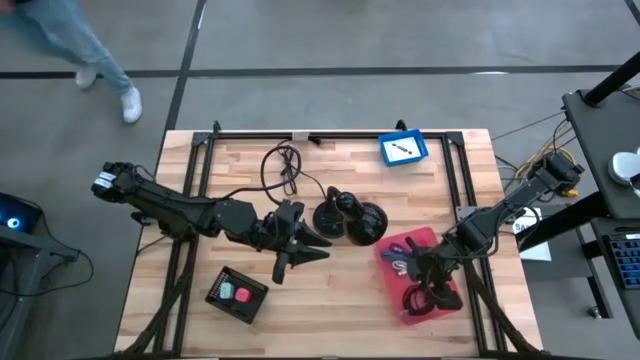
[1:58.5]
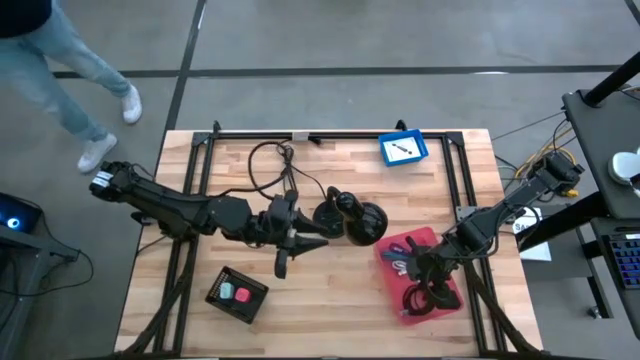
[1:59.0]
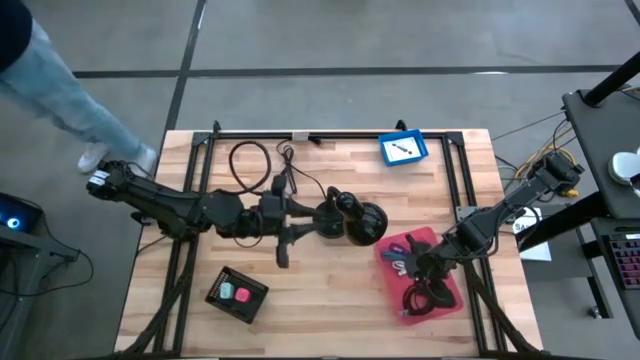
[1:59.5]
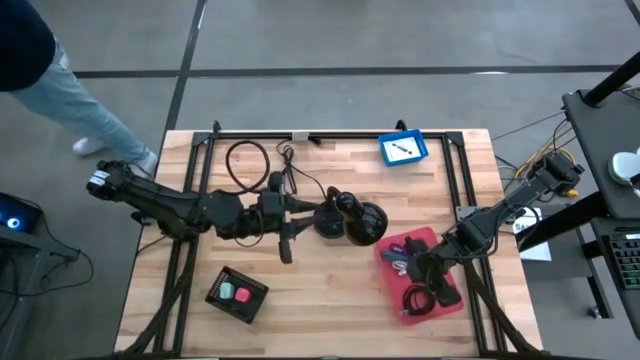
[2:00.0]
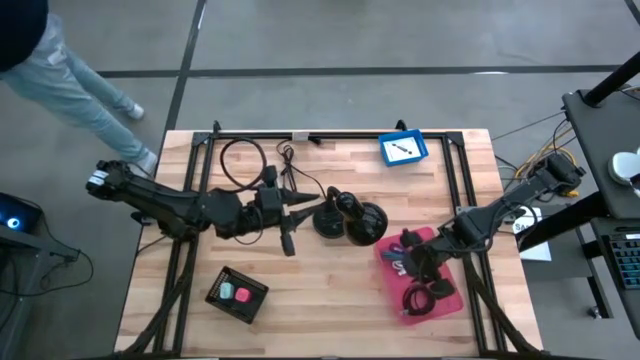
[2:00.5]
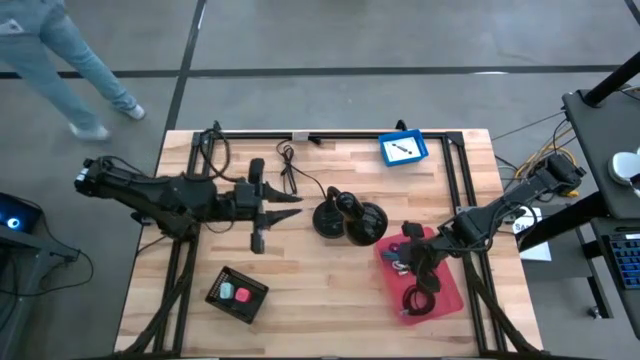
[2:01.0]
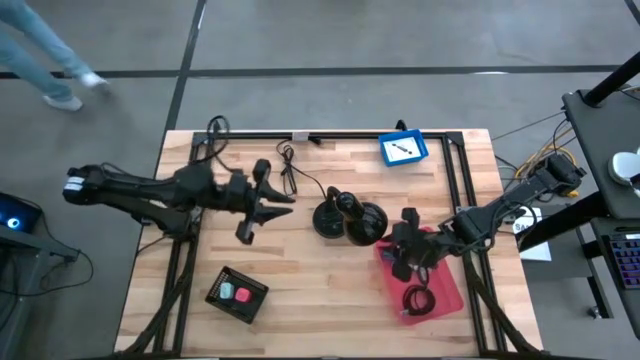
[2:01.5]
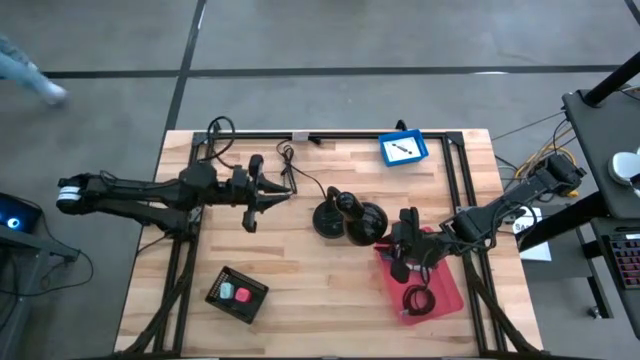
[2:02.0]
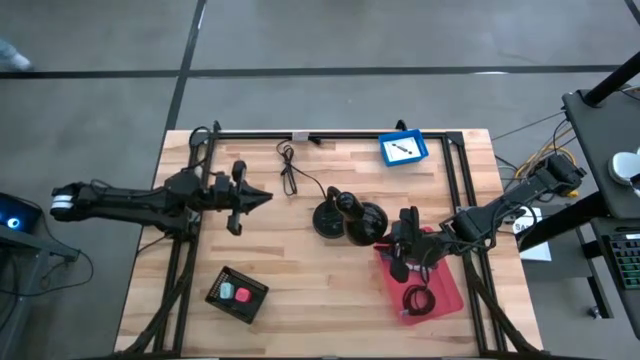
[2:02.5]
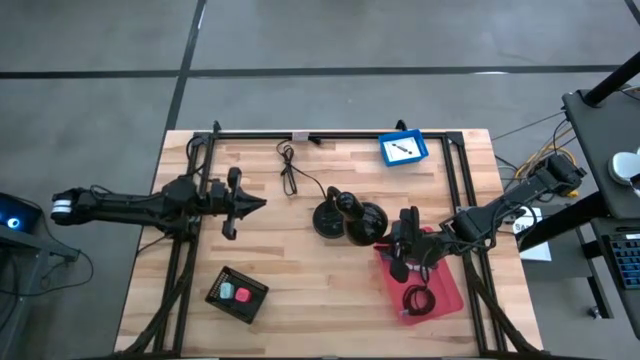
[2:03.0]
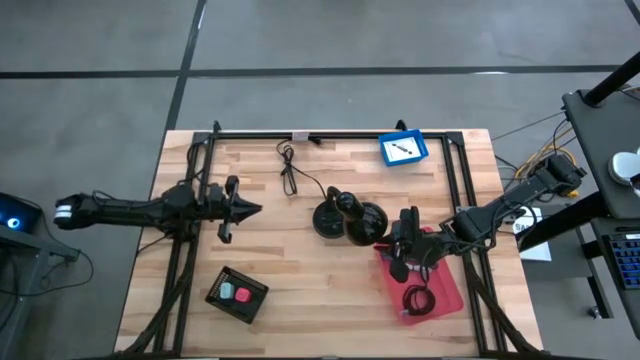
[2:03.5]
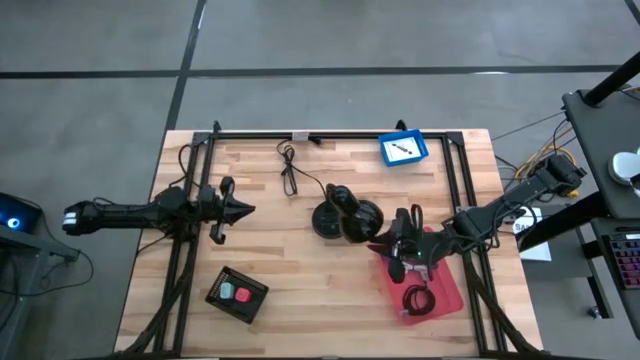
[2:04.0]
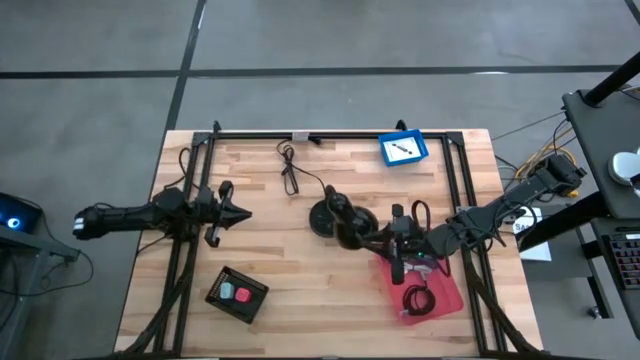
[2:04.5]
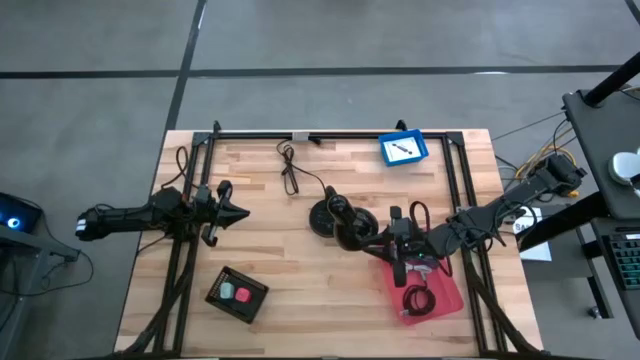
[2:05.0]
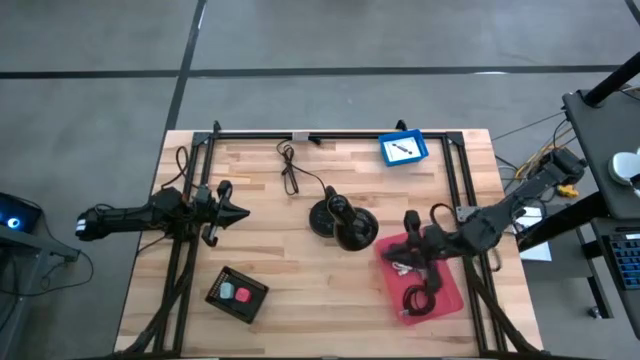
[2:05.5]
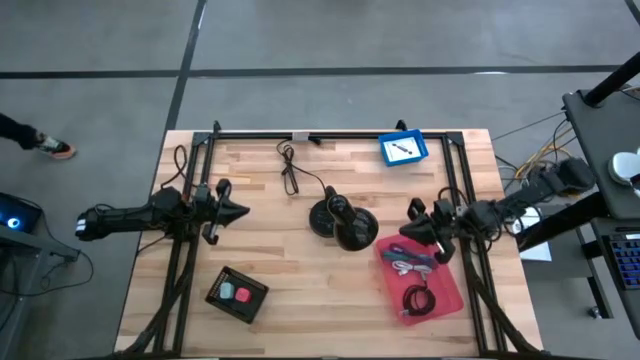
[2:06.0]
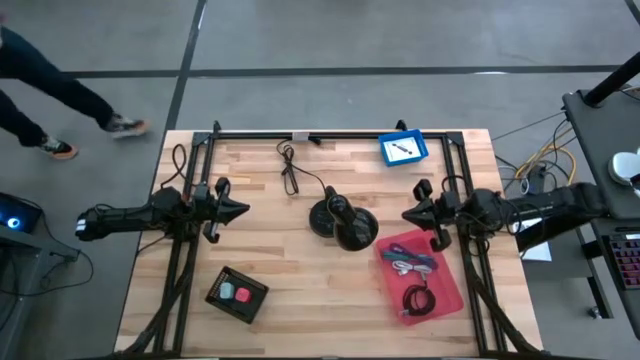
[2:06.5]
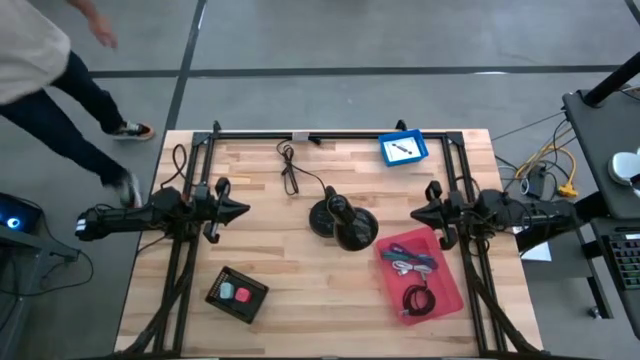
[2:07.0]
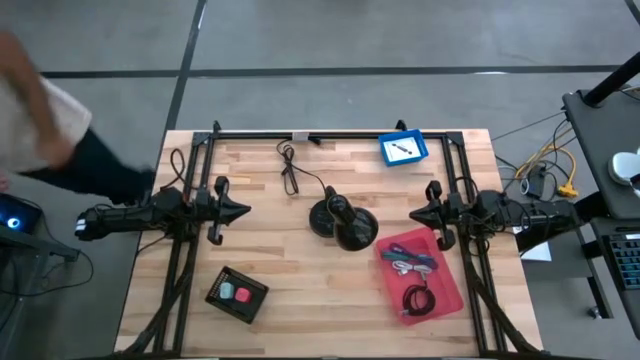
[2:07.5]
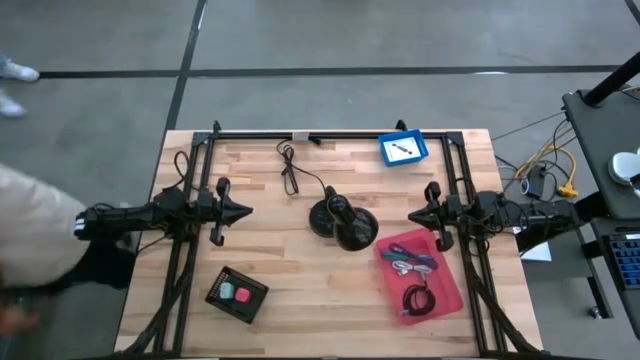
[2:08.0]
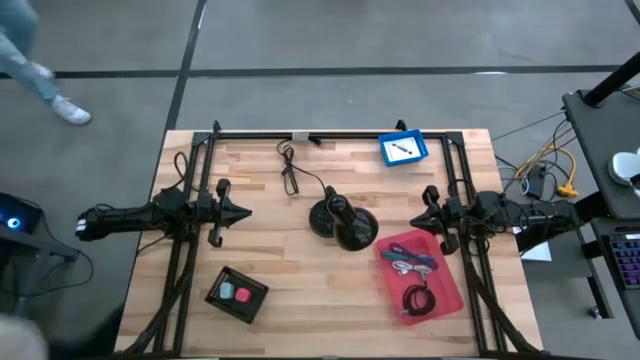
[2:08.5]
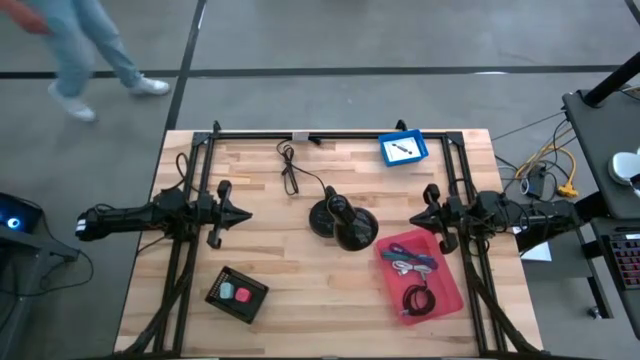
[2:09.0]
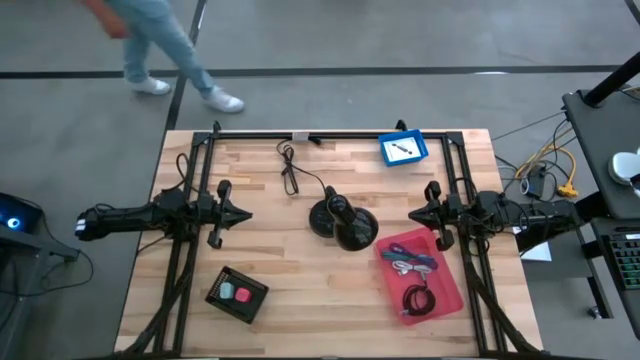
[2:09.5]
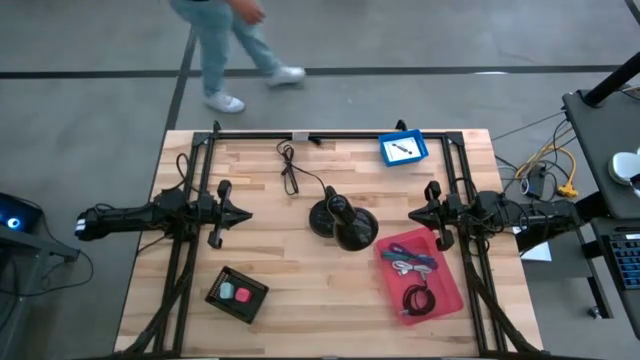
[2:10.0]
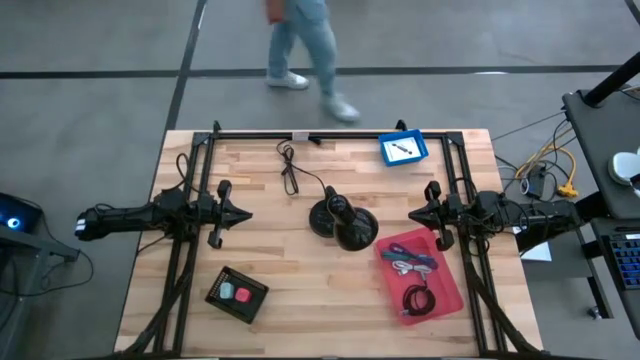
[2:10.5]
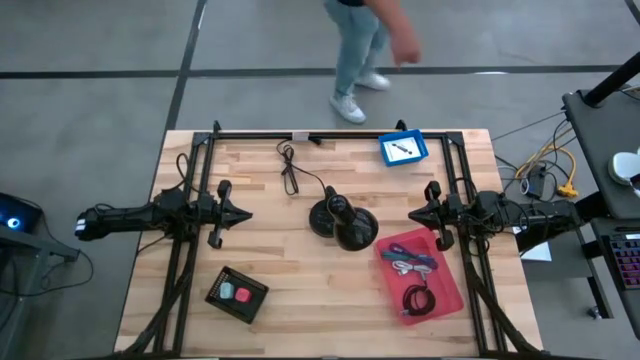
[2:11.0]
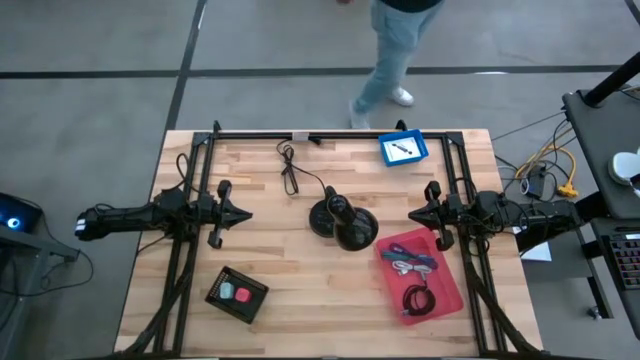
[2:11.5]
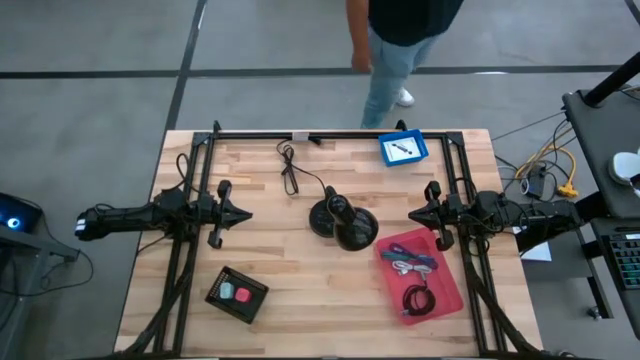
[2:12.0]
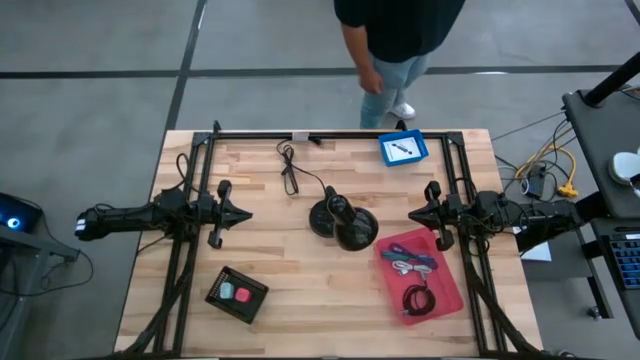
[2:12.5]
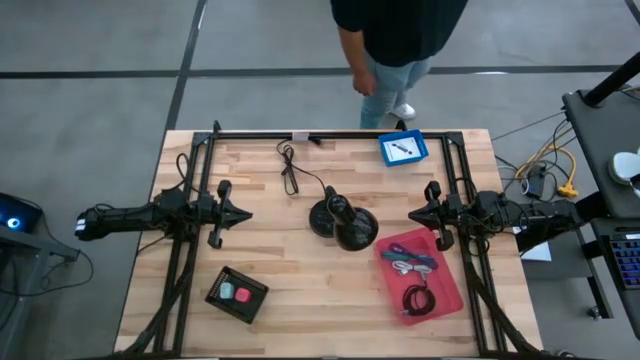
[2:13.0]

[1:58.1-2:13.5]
Task: Pick and place items into bin
Return to Home Position

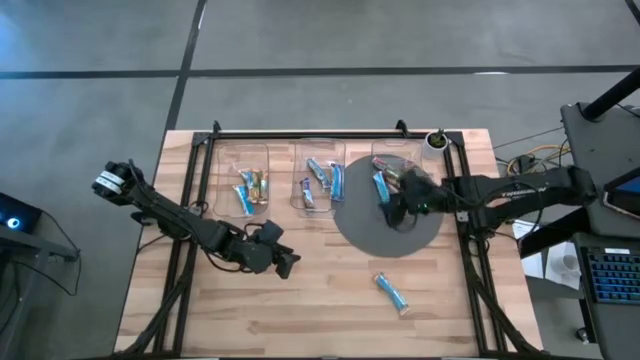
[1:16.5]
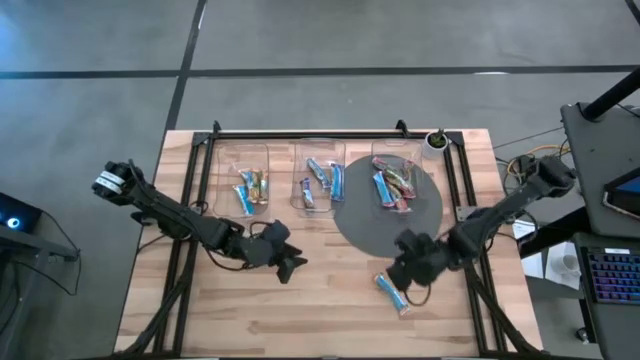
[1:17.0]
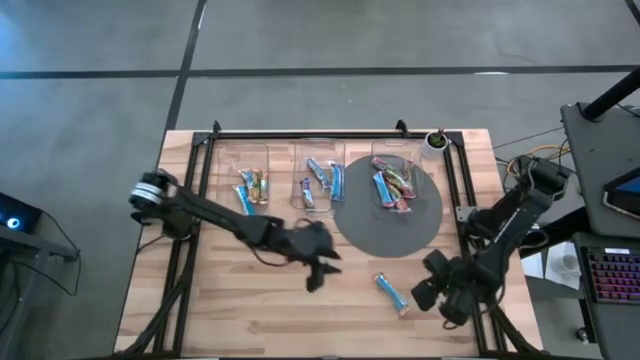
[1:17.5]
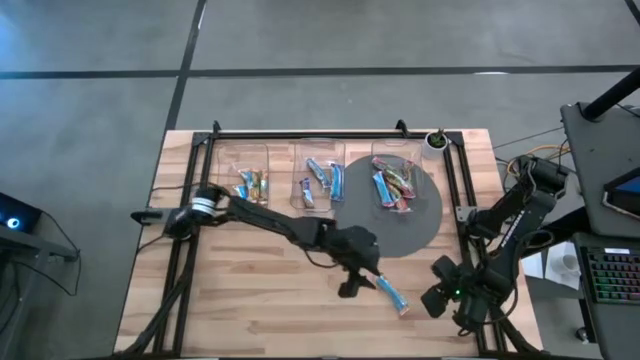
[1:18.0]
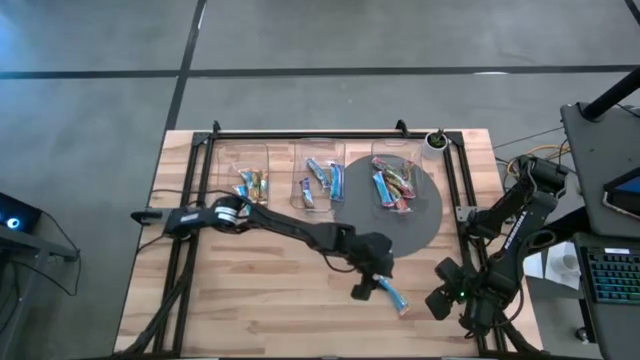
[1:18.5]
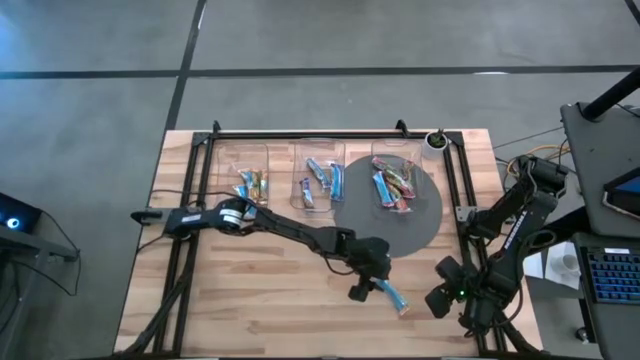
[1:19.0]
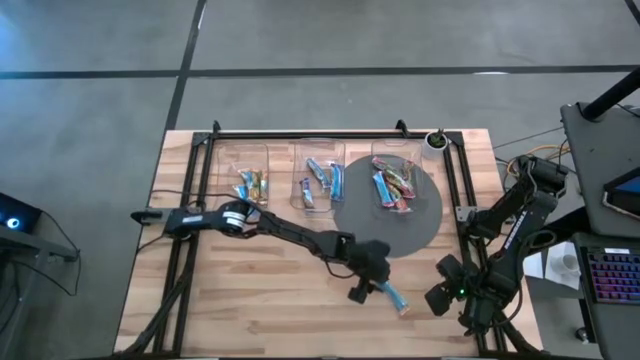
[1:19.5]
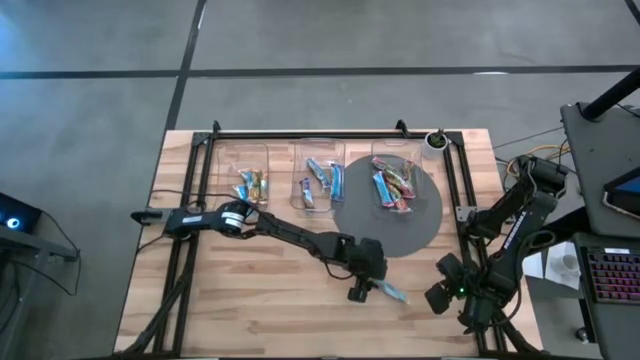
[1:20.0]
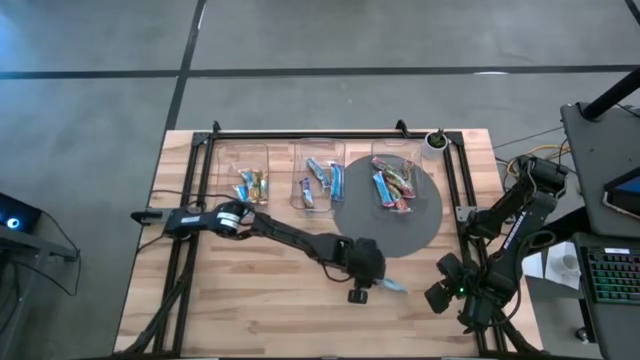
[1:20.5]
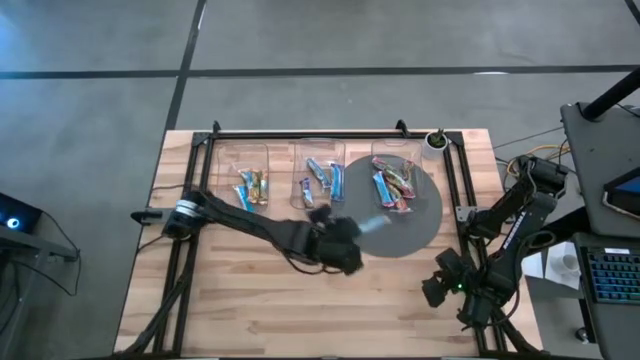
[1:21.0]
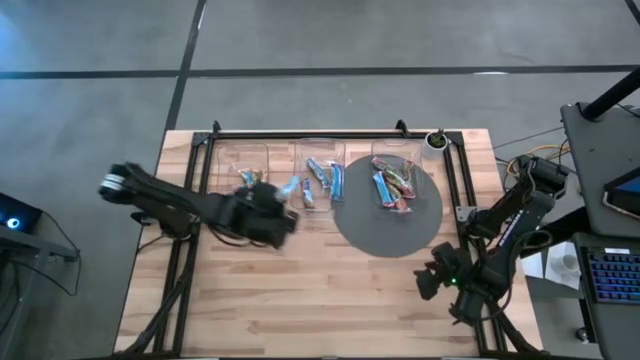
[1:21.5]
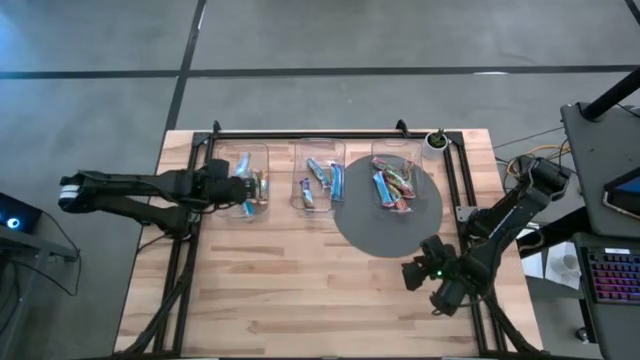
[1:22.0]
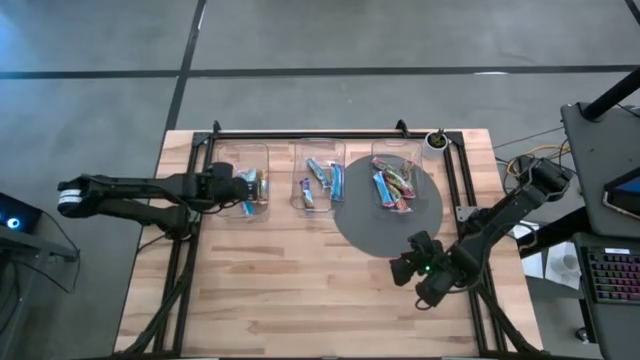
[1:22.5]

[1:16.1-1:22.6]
Task: Pick and place Granola Bars by type
Put the orange granola bar into the left transparent container

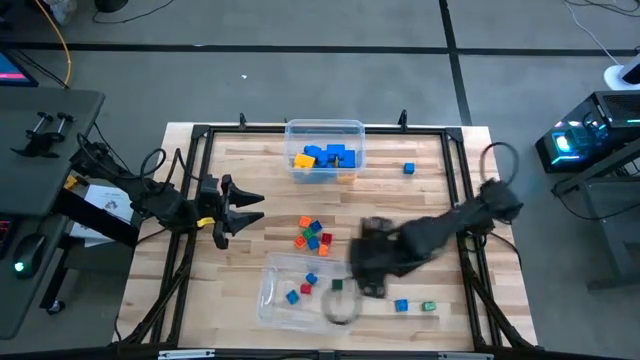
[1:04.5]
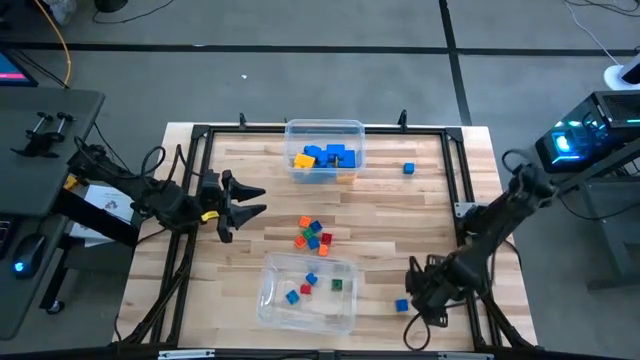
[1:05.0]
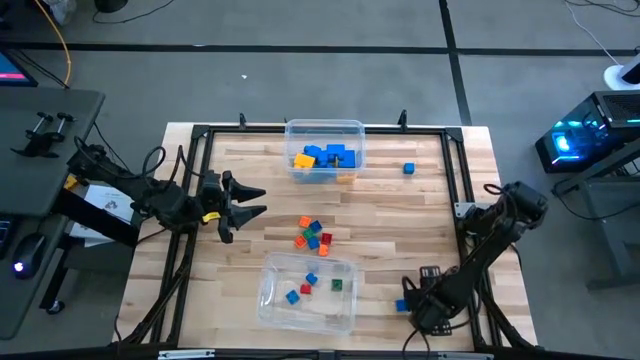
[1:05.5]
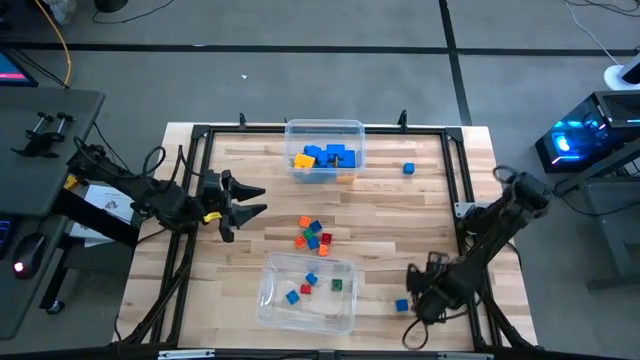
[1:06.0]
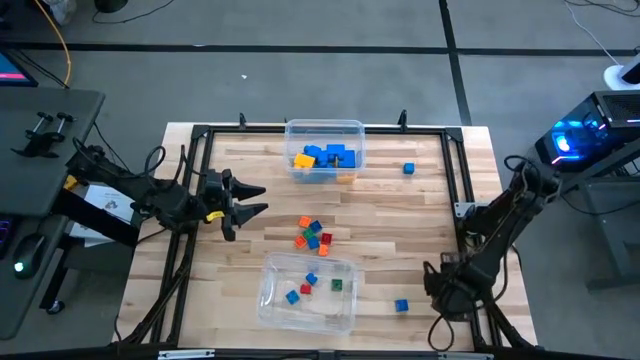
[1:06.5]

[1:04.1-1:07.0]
Task: Sort blocks by size
Put the small green game piece into the bottom transparent bin
